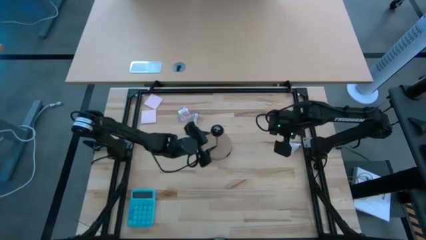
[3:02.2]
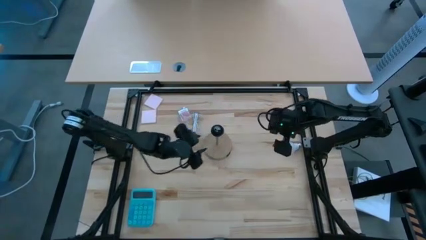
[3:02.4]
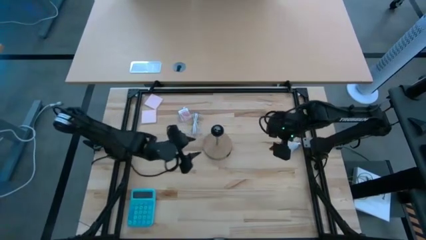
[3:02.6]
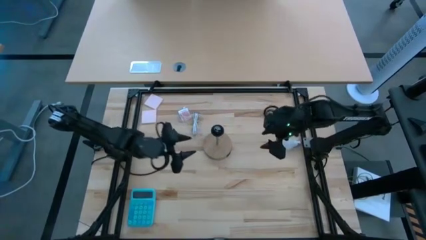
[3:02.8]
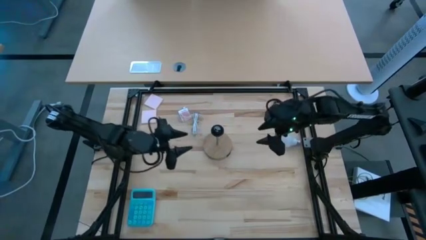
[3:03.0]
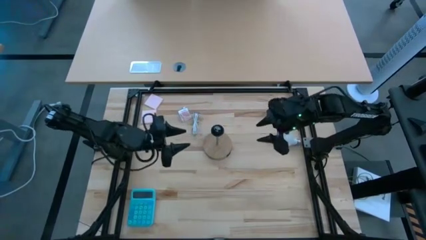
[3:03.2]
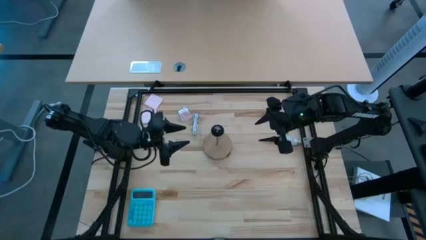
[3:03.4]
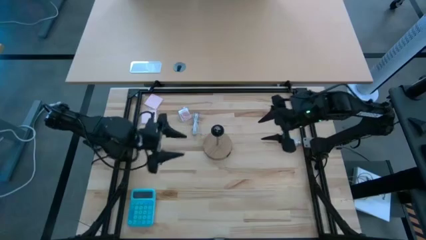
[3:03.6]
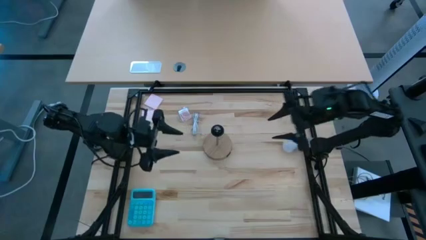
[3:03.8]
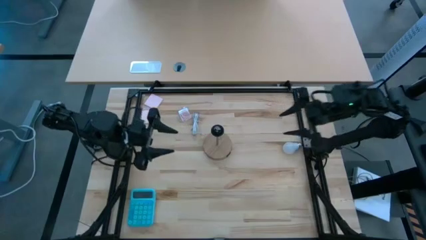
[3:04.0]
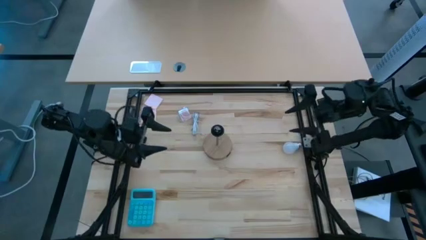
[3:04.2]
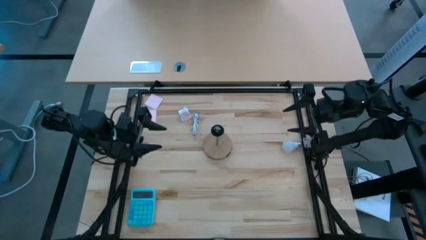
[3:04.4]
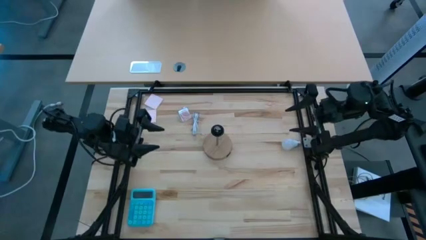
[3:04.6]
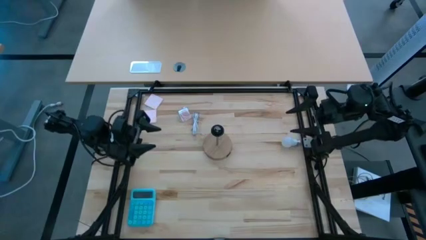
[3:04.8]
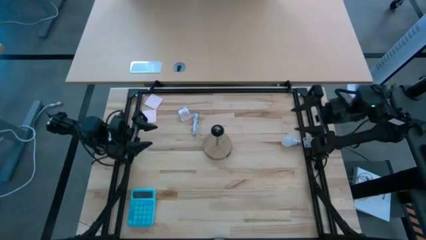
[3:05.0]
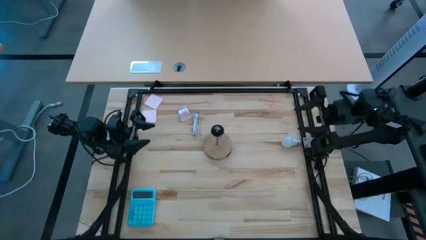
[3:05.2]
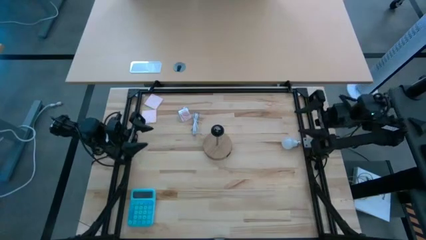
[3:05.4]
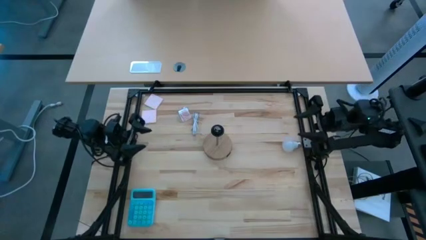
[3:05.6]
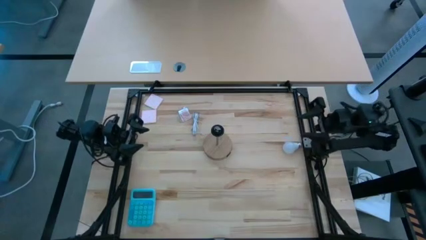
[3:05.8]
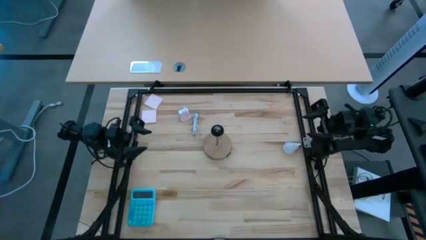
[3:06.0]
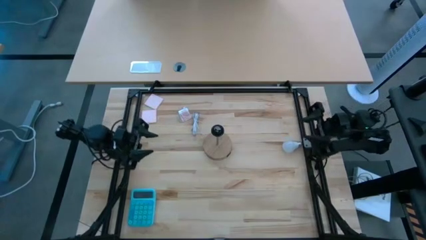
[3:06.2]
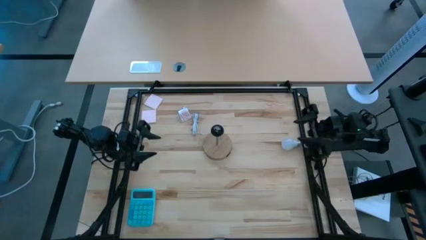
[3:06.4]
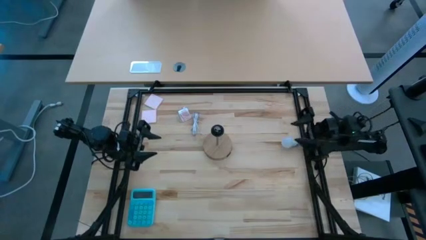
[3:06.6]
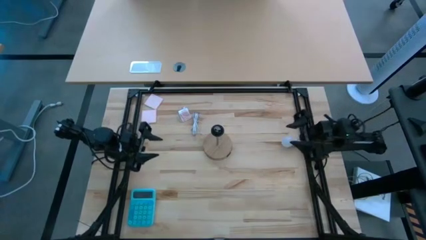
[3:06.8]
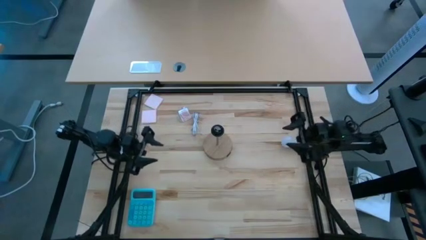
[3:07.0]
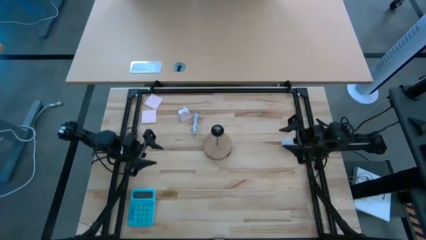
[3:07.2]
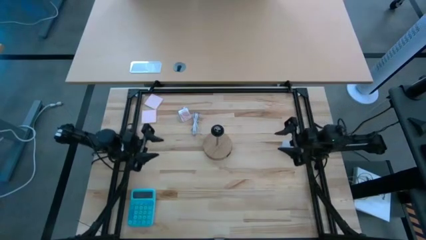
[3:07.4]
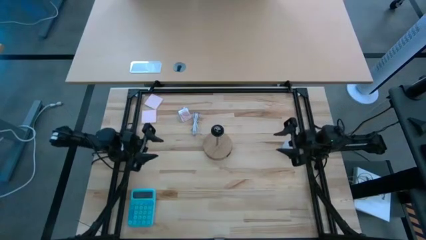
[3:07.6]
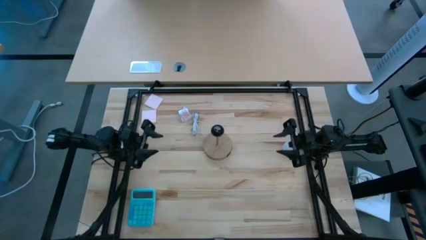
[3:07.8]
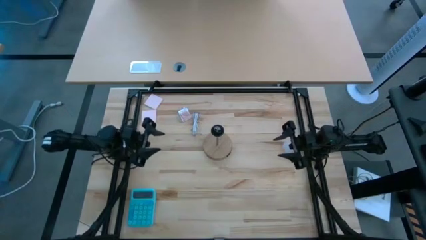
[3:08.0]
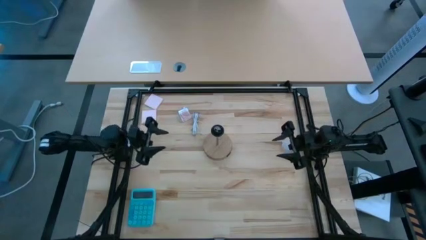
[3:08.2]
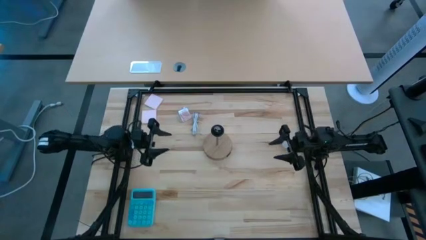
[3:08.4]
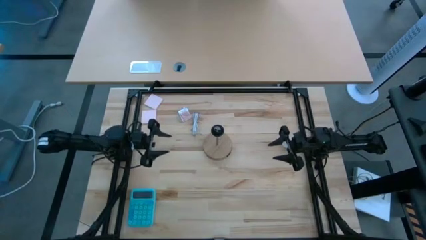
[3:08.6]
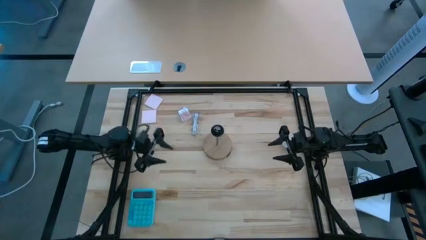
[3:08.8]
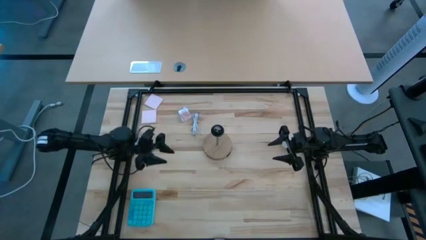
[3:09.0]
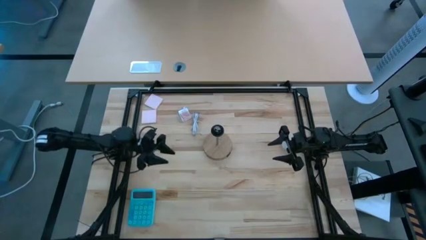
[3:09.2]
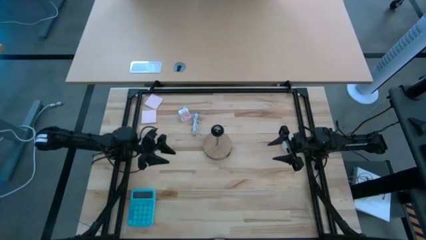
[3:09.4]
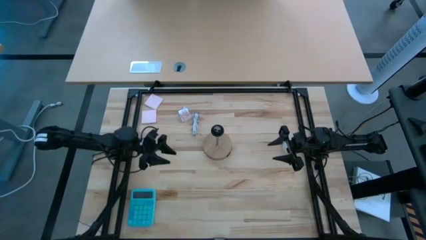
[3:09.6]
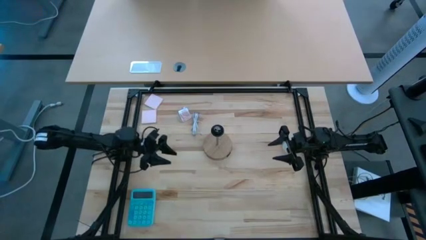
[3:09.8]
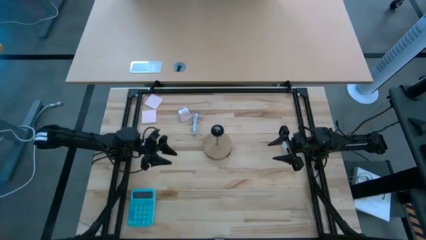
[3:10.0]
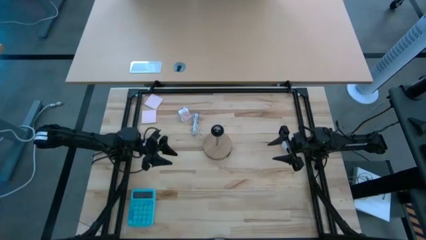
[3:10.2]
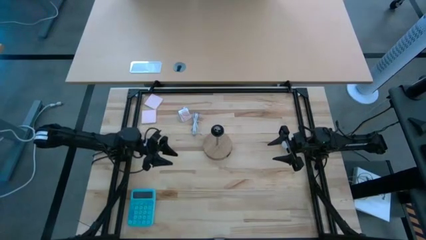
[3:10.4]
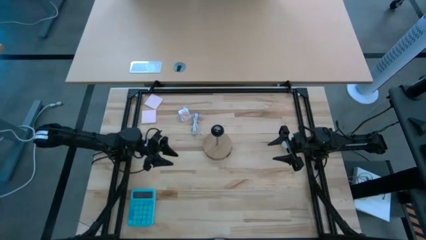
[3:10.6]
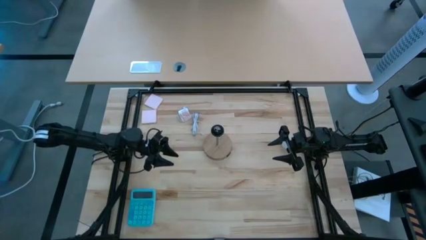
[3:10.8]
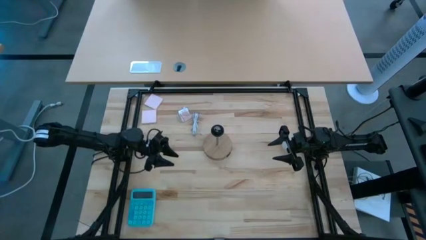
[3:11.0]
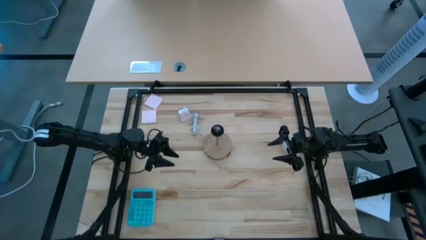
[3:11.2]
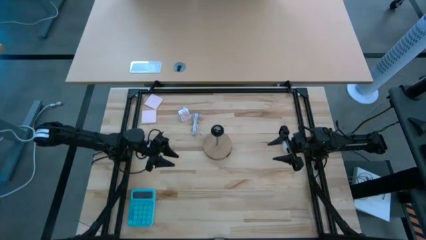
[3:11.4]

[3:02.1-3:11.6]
Task: Screw lightbulb
Return to Home Position

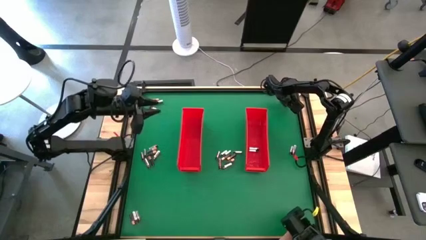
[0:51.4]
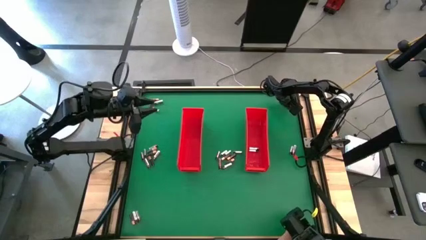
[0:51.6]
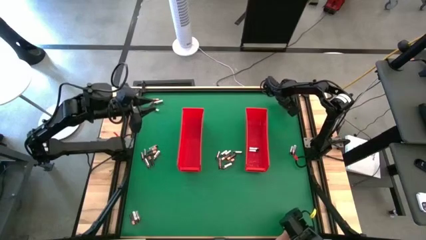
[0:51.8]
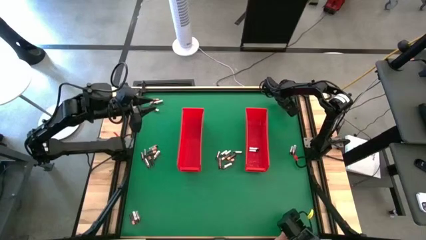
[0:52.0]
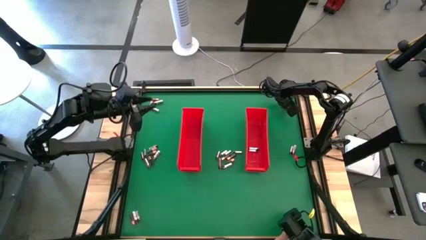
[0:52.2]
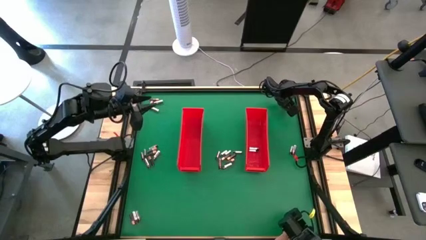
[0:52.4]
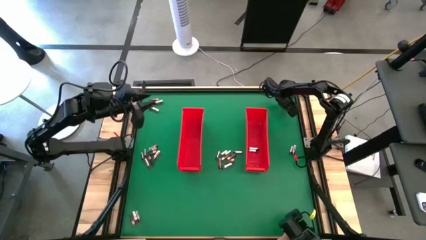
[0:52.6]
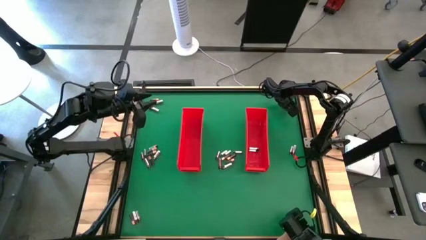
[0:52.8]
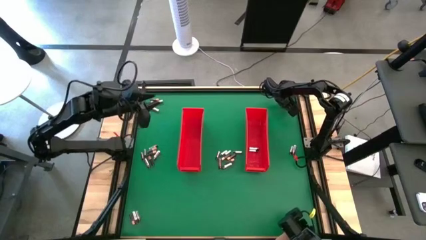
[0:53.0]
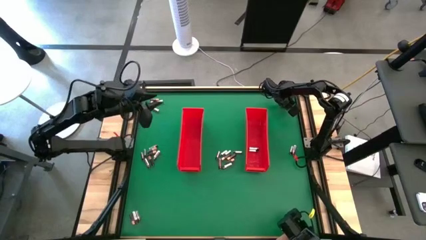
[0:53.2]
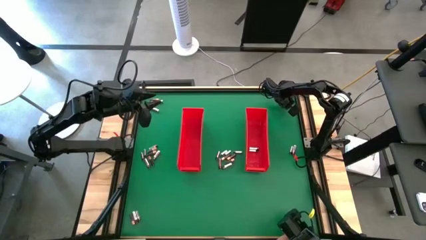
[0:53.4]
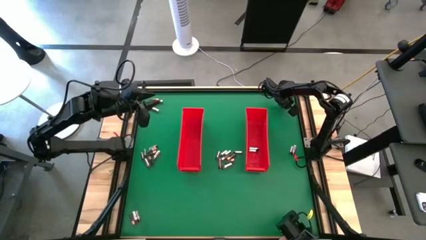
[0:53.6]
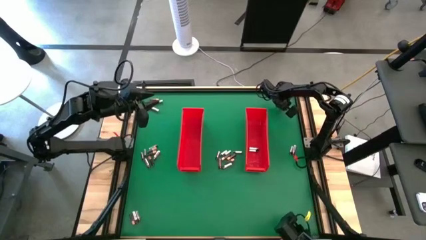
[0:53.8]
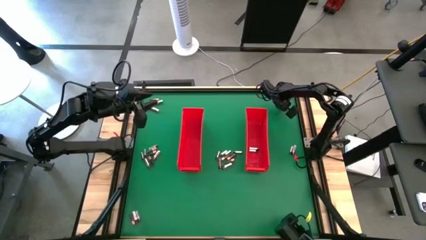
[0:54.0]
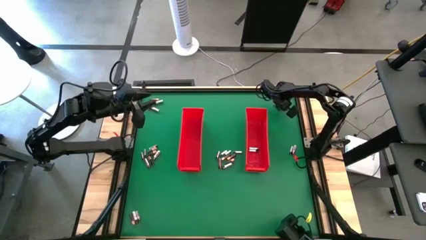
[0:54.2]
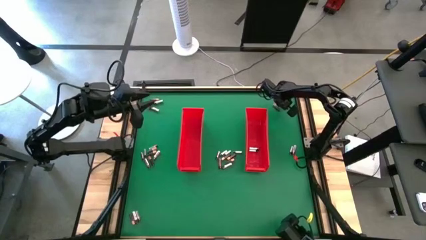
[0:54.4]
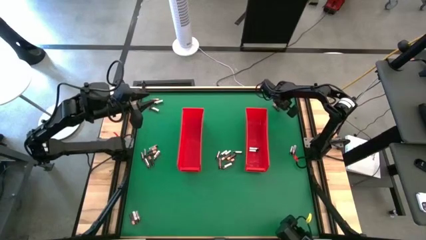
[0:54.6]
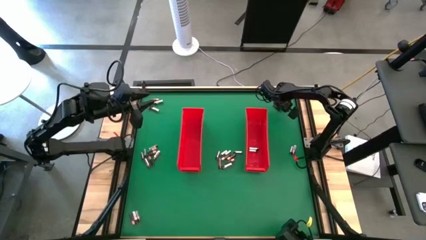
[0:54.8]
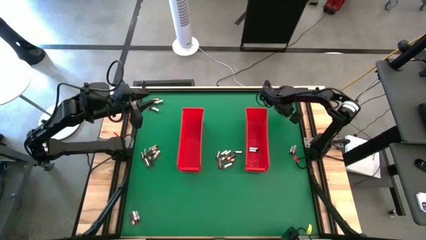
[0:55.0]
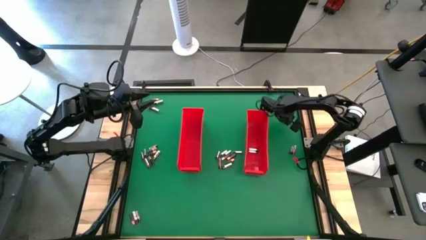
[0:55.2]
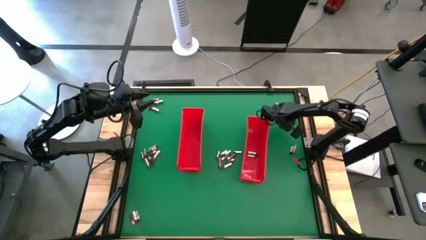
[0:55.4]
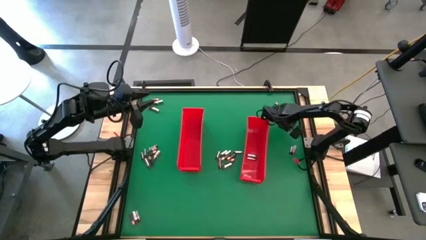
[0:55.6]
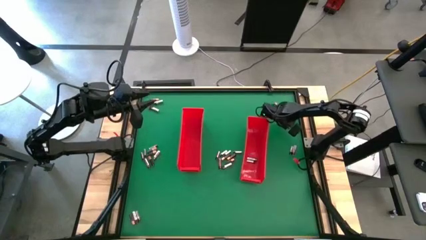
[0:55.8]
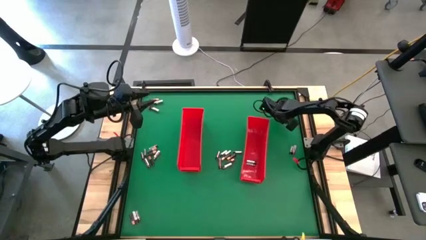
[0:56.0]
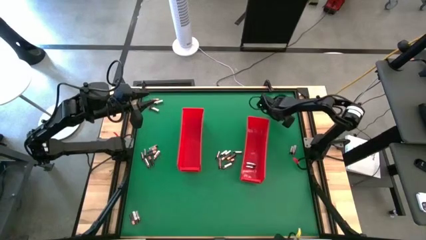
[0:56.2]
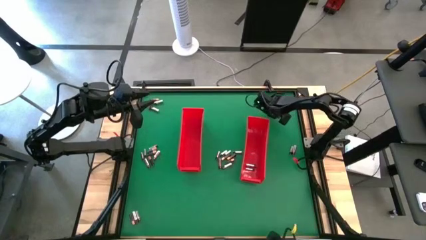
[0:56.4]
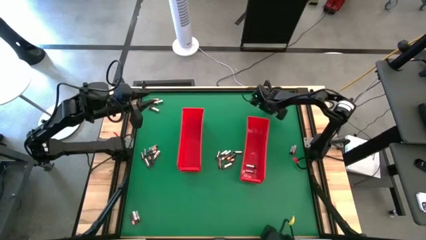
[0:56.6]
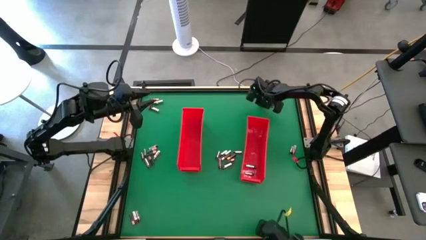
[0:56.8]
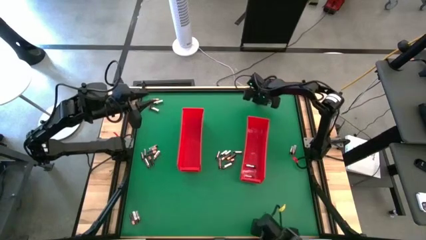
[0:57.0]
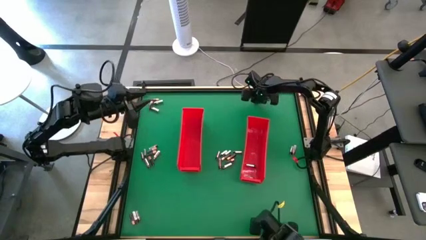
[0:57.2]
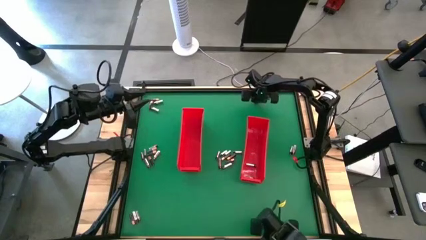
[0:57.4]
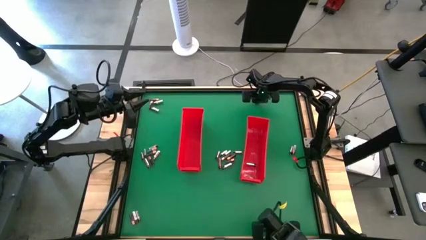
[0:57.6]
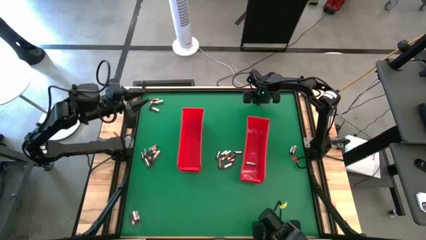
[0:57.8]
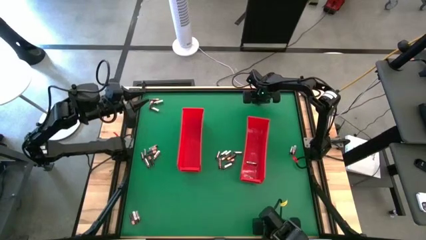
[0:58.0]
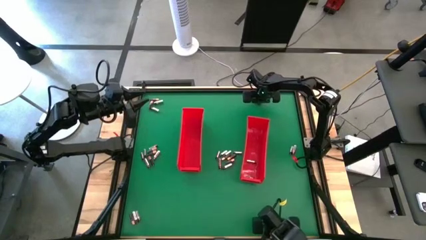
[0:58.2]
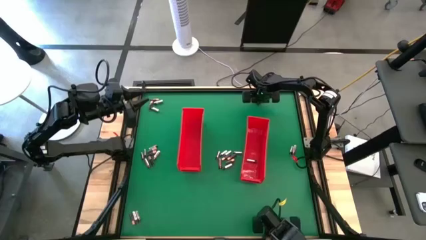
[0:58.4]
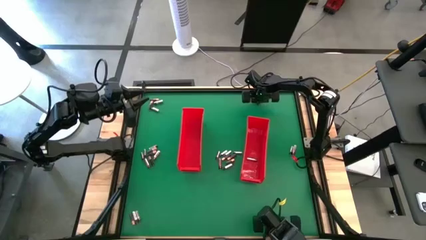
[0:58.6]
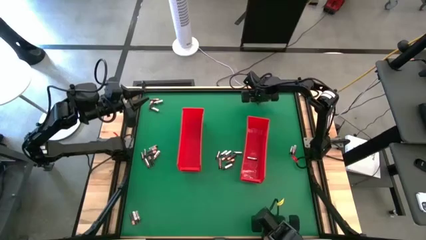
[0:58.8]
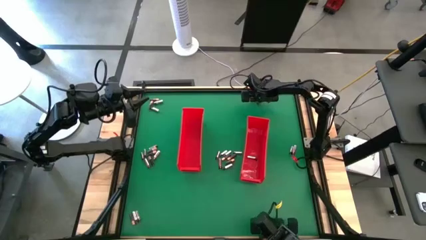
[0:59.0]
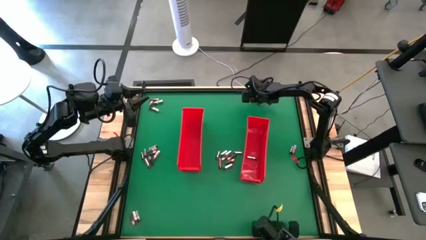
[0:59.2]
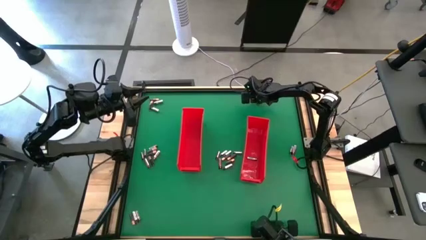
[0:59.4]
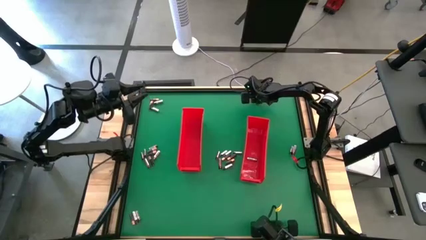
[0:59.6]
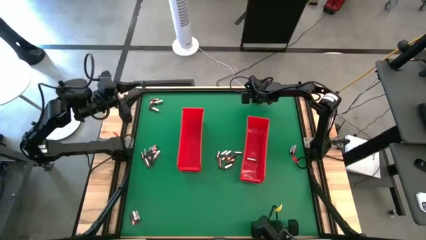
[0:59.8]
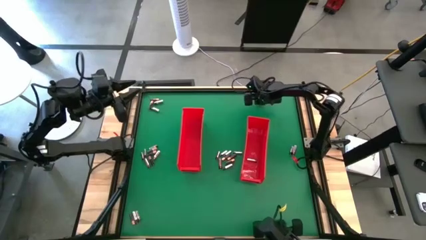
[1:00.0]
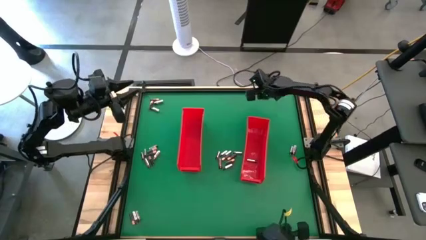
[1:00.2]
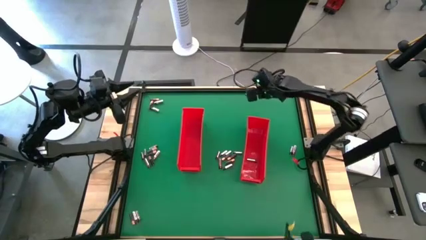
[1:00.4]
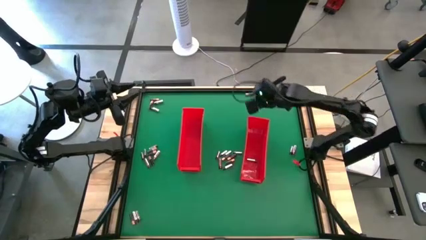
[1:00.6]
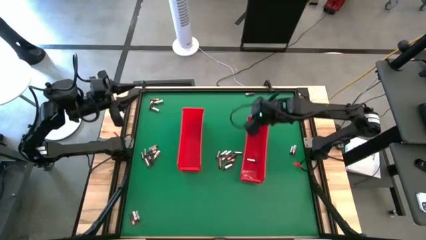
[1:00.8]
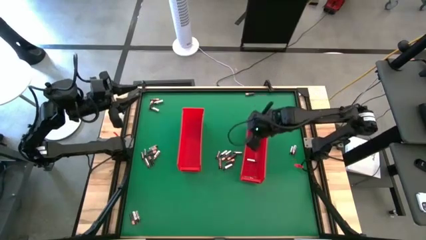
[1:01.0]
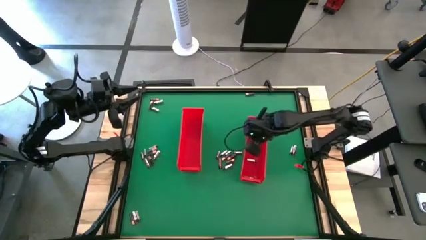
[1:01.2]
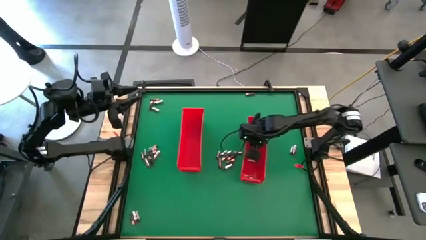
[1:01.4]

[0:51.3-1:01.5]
Task: Sort batteries
Put the silver battery into the right red bin
